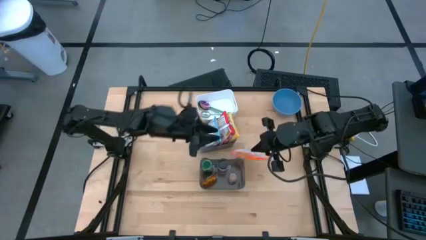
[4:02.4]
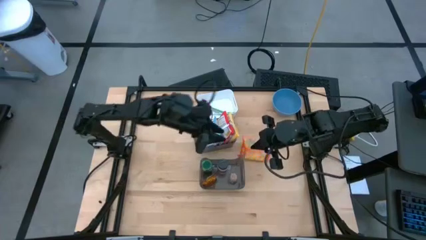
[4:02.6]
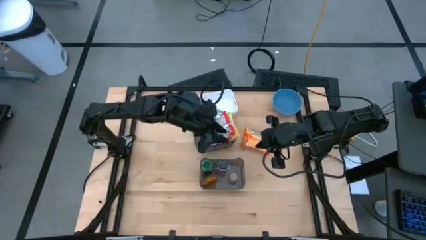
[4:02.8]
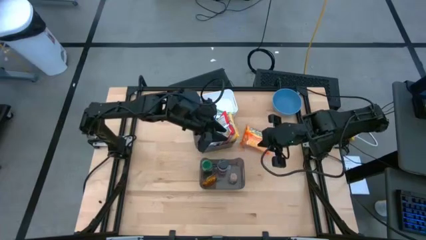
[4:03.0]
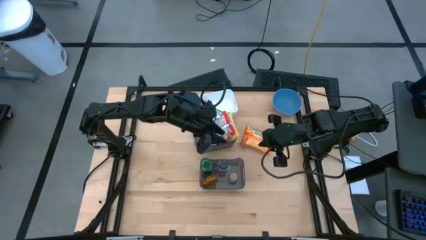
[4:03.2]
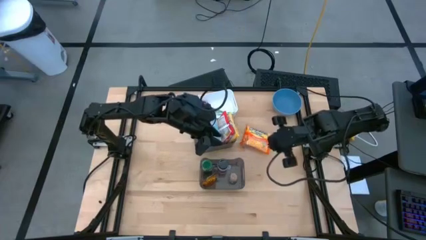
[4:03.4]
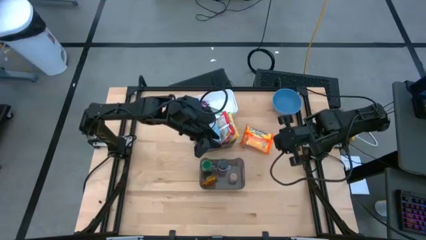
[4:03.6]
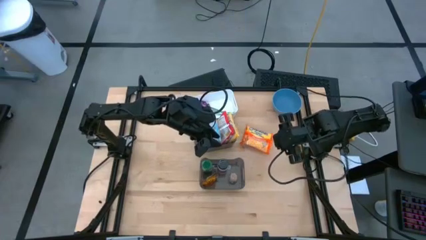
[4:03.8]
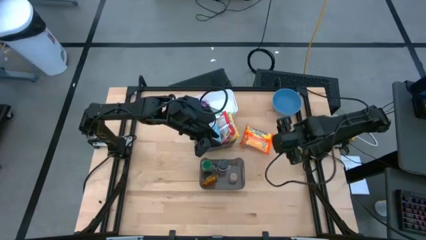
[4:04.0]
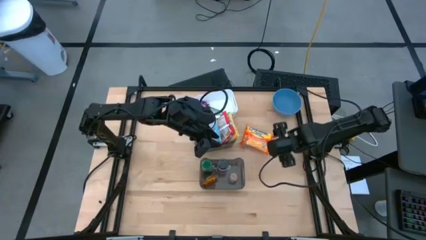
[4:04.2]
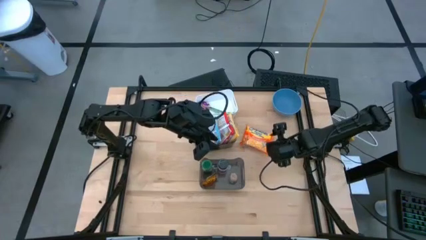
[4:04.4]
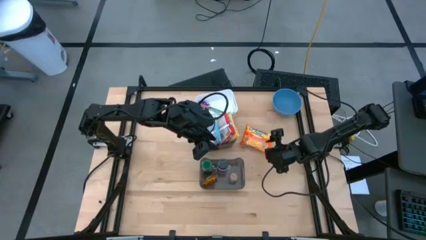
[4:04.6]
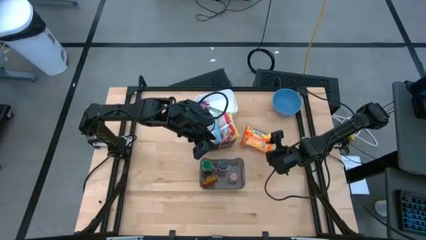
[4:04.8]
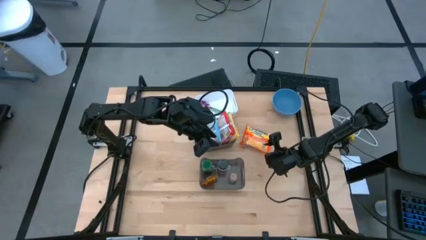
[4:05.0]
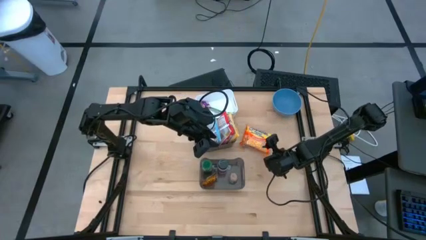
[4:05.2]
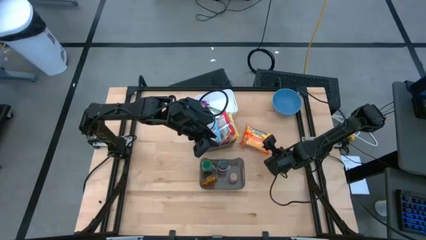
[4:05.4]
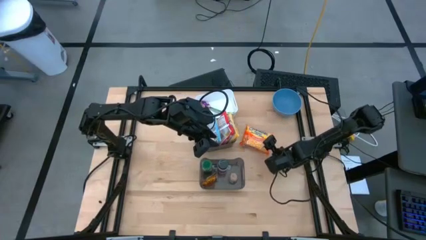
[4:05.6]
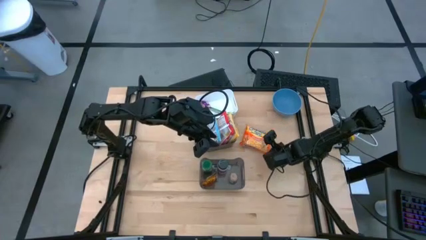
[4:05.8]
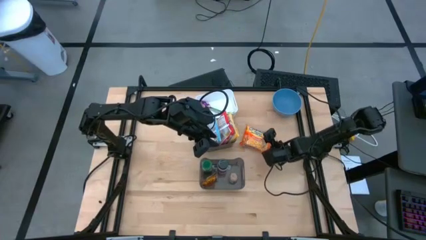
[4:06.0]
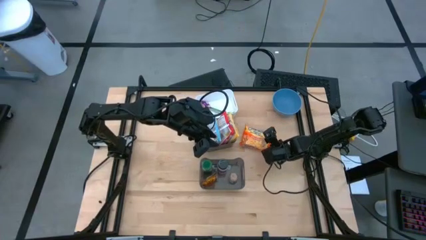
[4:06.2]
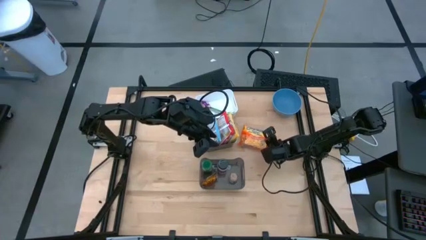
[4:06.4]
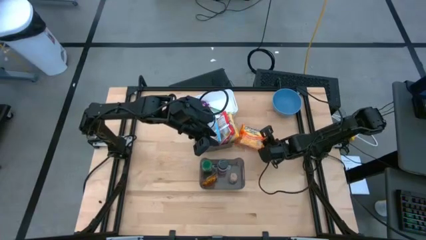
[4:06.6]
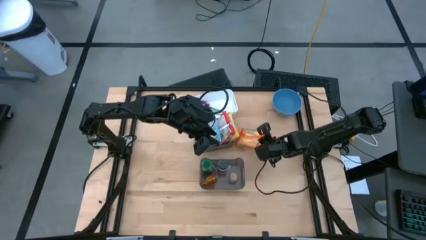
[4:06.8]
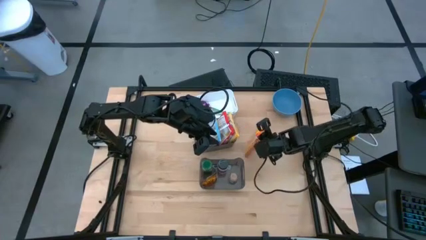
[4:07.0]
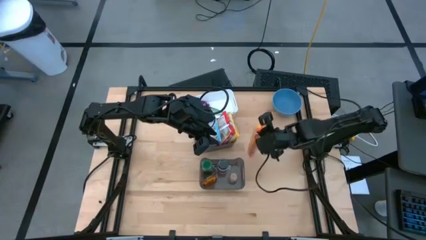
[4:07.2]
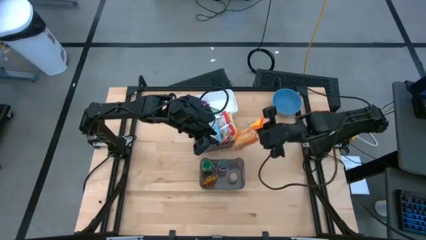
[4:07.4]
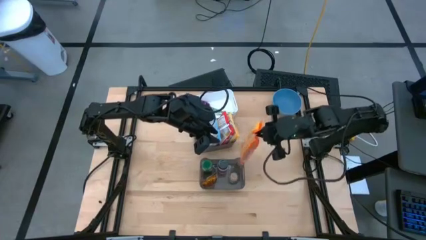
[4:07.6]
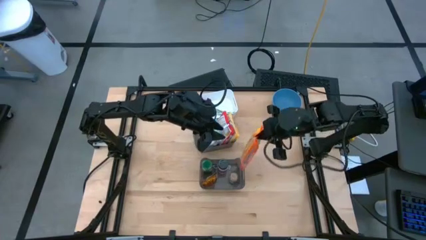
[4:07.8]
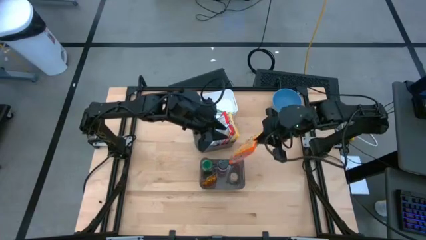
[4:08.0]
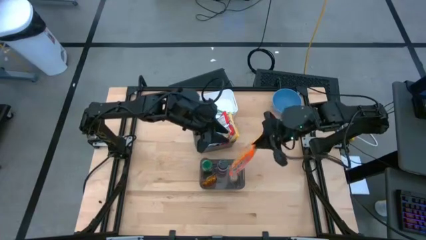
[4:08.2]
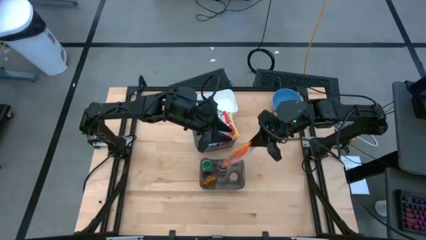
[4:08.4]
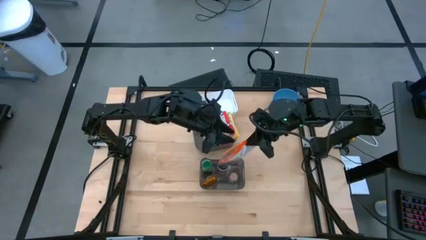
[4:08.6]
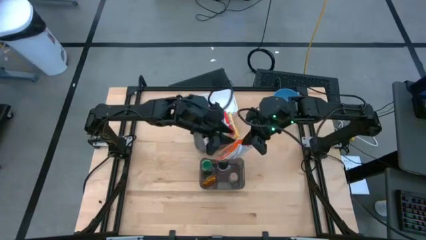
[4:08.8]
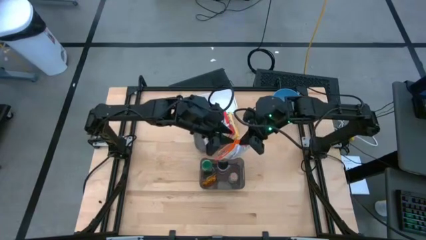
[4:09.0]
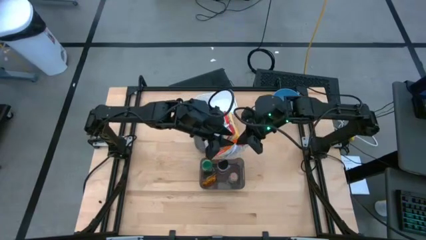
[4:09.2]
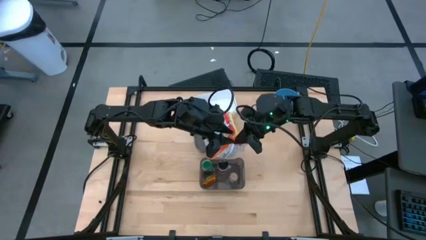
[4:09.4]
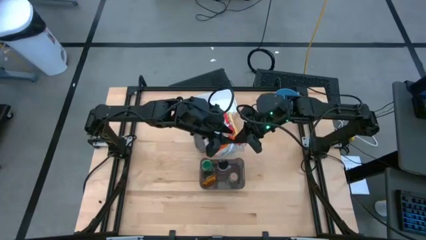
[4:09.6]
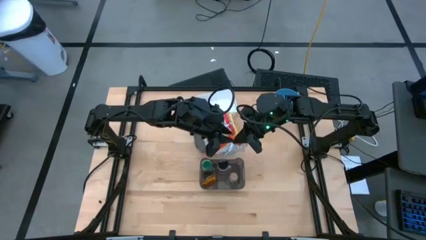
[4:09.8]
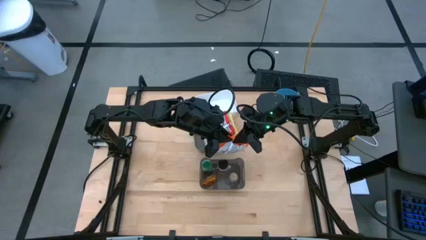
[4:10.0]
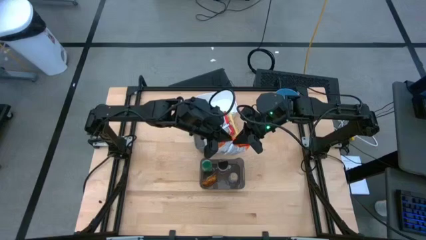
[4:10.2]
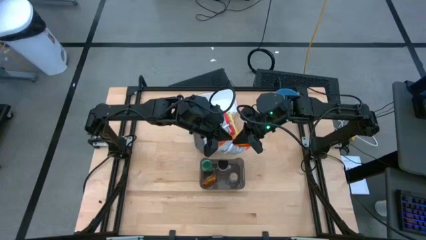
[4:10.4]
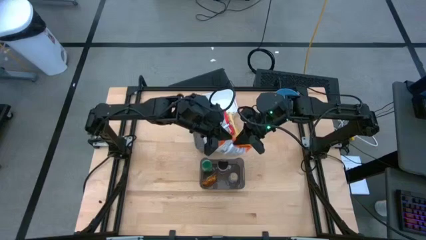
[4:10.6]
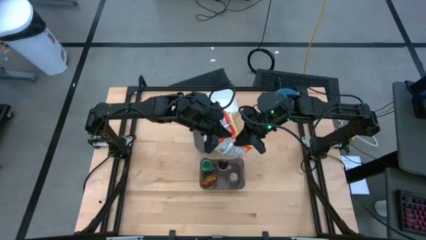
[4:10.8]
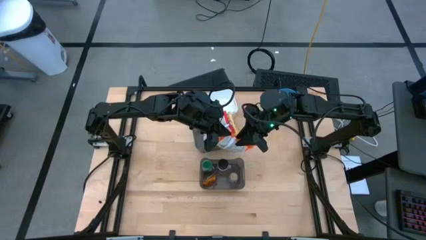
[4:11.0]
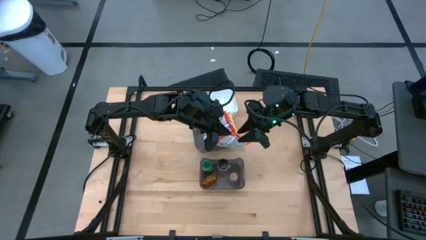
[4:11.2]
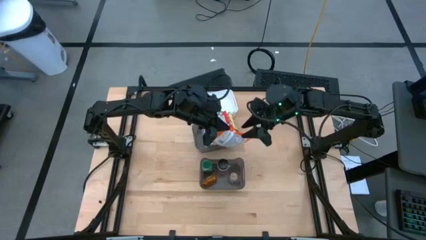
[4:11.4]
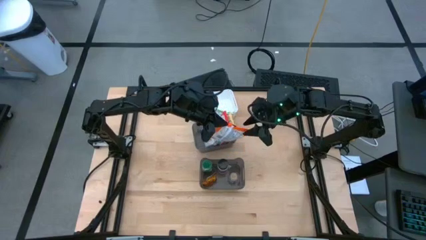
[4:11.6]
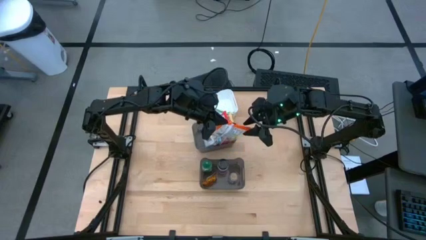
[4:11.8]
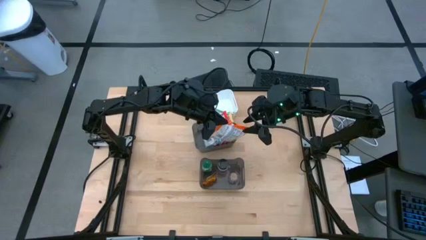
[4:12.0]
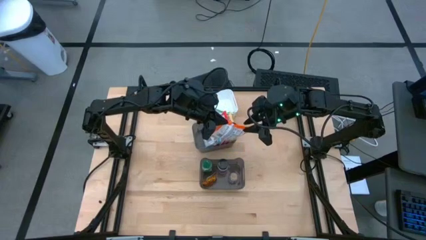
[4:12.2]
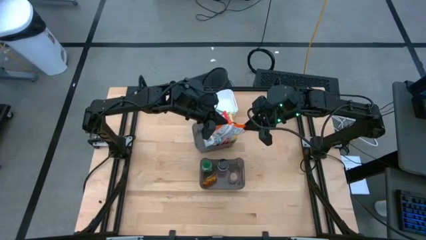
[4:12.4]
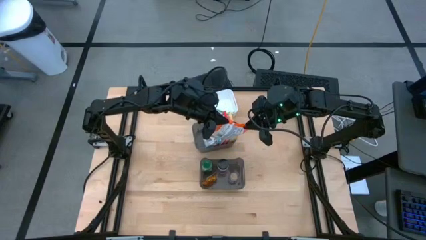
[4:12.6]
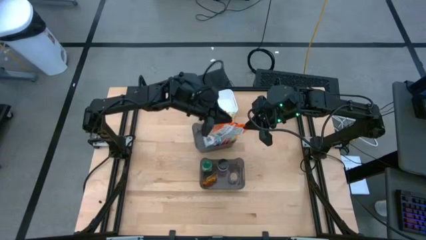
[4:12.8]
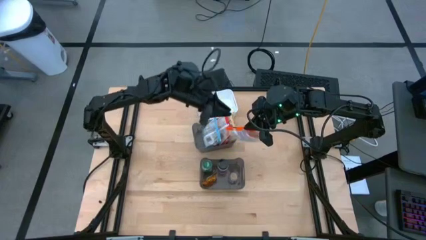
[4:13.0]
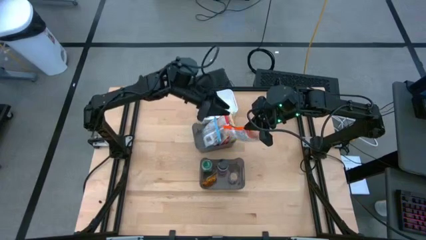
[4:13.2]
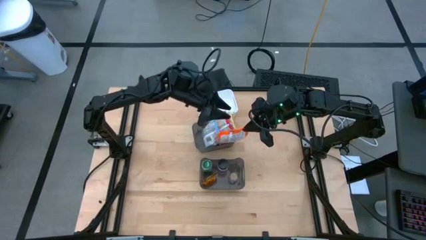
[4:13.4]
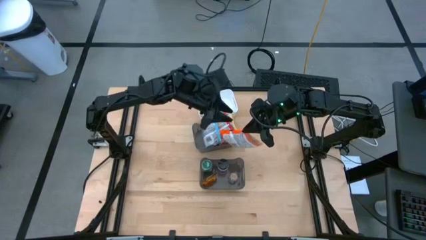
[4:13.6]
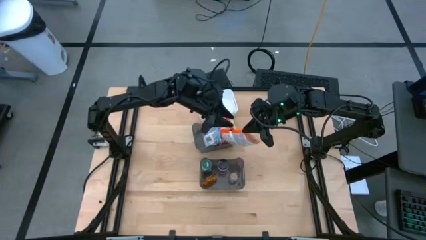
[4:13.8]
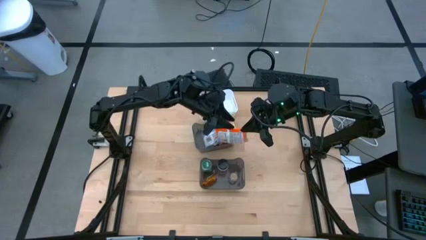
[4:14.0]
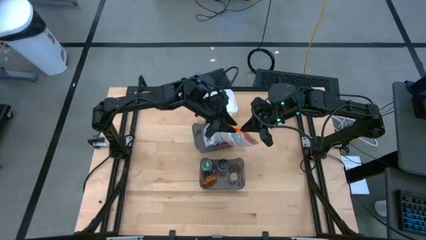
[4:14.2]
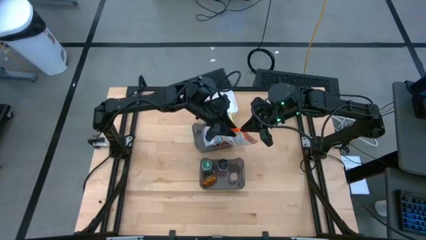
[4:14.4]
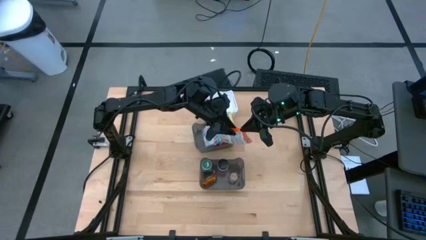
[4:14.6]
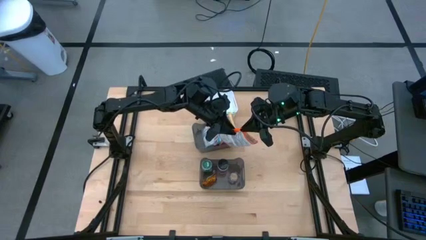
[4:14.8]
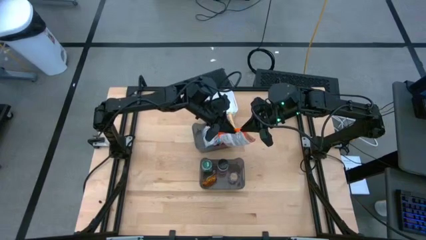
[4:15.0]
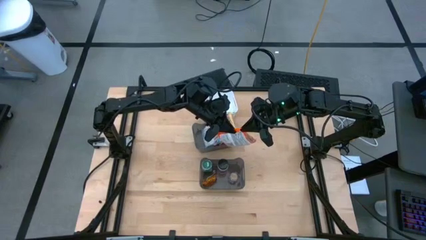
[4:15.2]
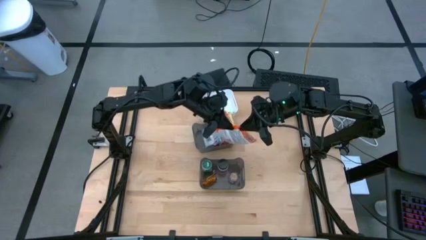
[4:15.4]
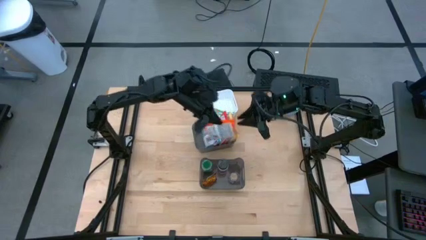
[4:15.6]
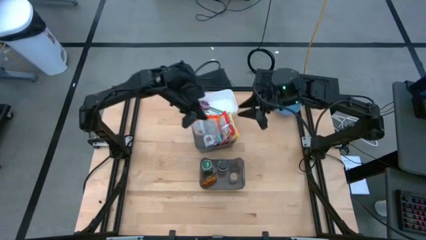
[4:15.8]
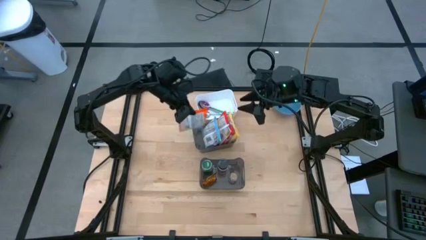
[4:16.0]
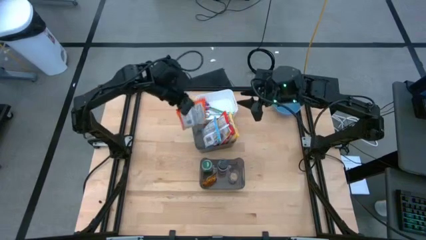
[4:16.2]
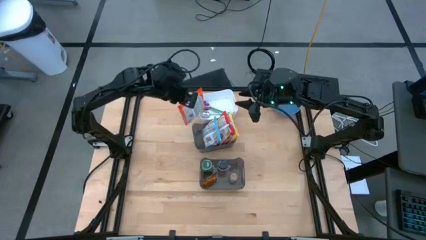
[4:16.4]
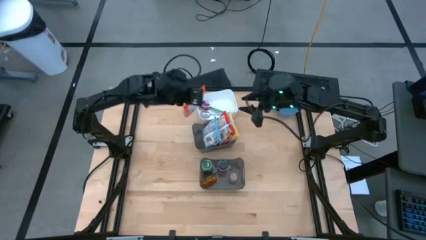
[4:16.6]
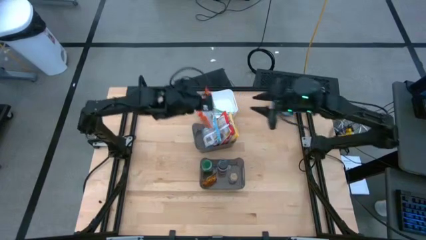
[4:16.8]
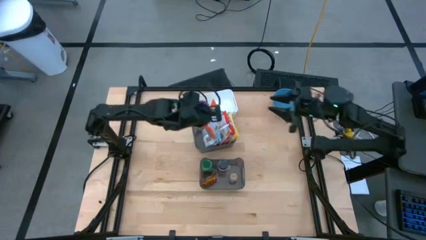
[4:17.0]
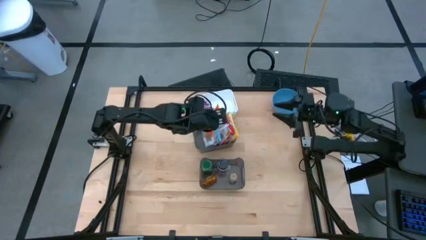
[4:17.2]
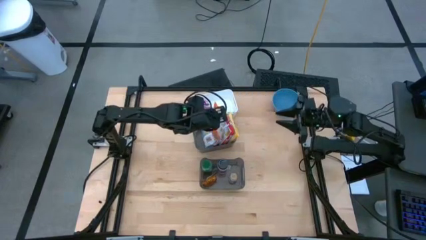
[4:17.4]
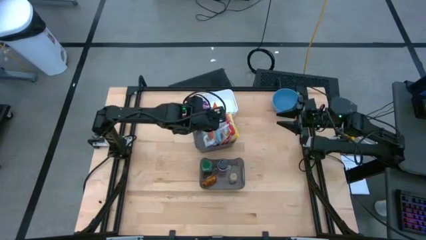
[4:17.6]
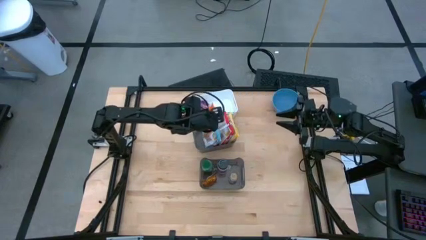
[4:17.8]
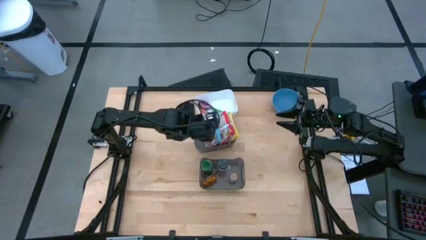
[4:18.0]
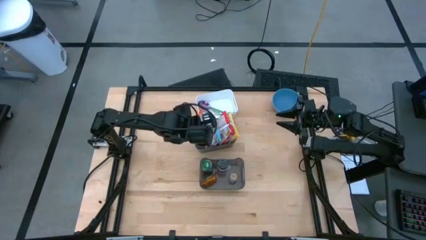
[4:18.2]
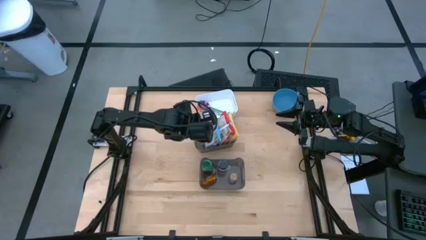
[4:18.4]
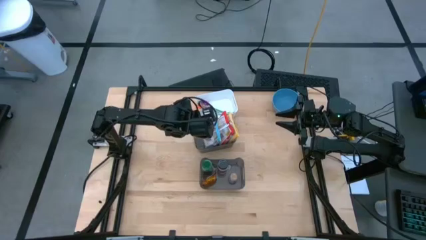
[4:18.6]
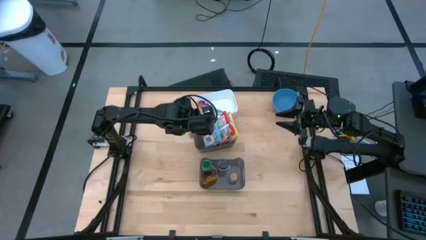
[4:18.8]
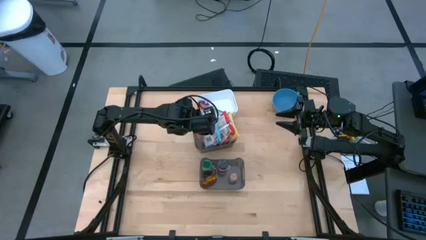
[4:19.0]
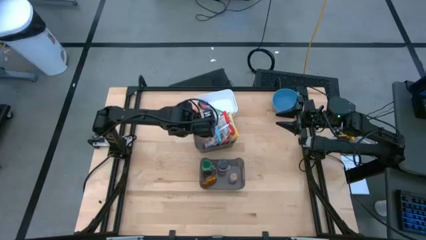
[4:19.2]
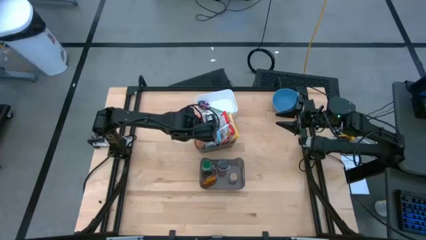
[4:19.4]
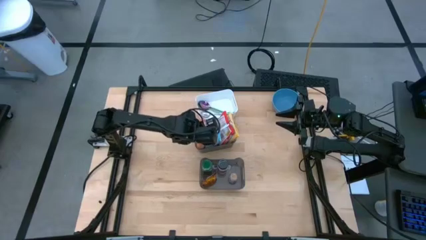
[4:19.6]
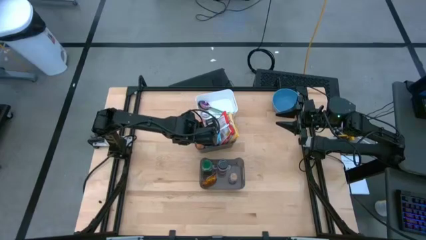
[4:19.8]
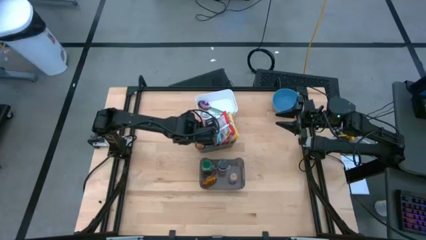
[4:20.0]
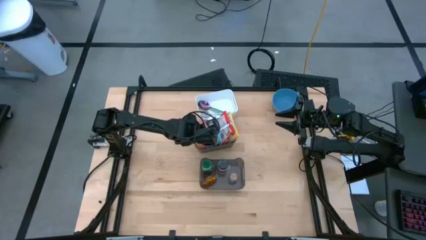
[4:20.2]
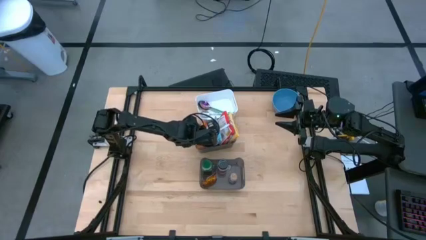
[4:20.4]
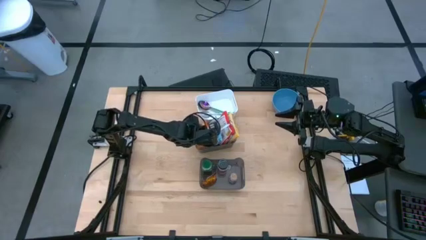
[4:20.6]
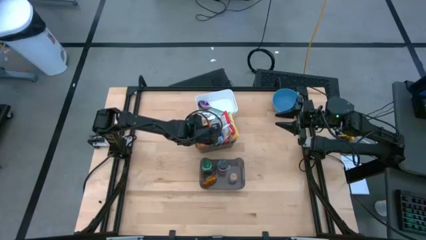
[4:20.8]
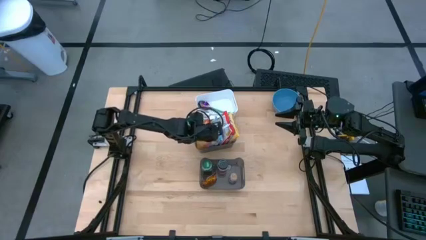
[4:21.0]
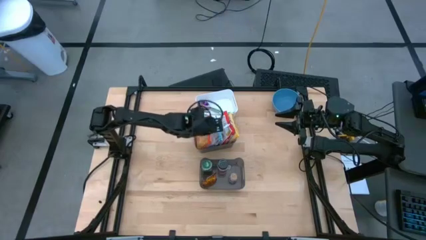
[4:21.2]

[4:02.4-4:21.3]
Task: Pick & Place Food Item
Put the orange noodle pack into the top black bin
